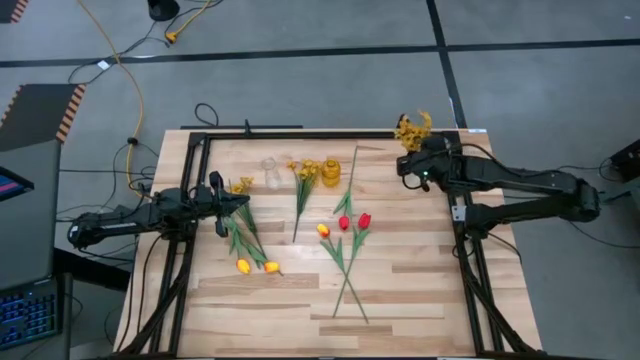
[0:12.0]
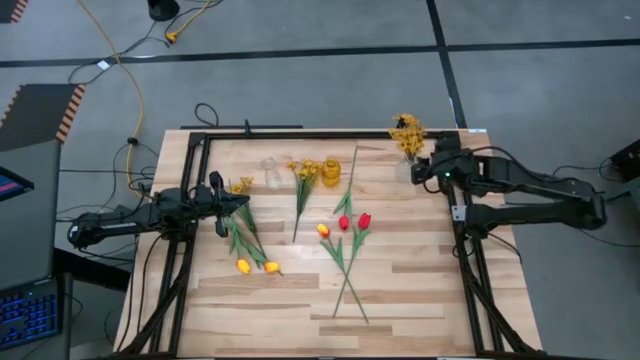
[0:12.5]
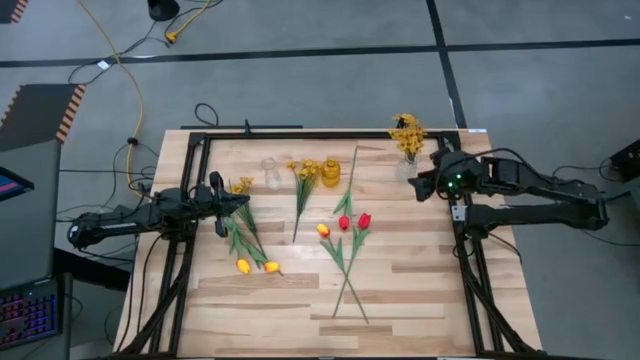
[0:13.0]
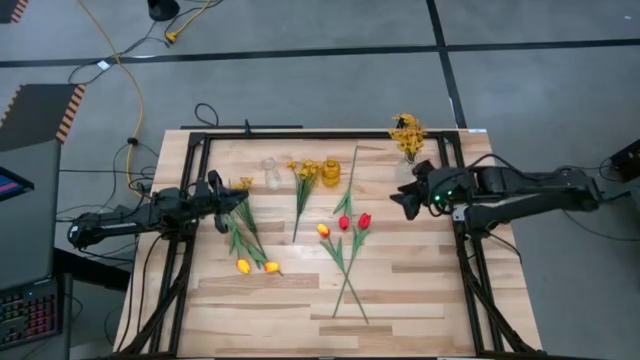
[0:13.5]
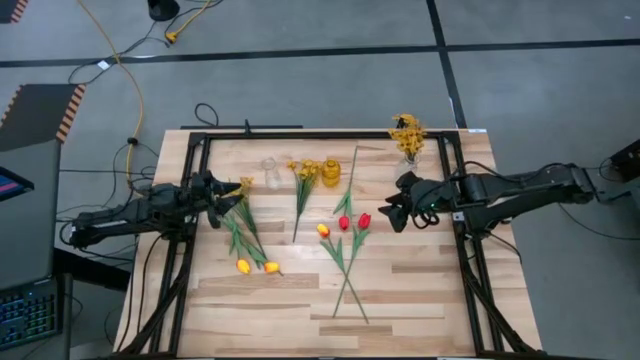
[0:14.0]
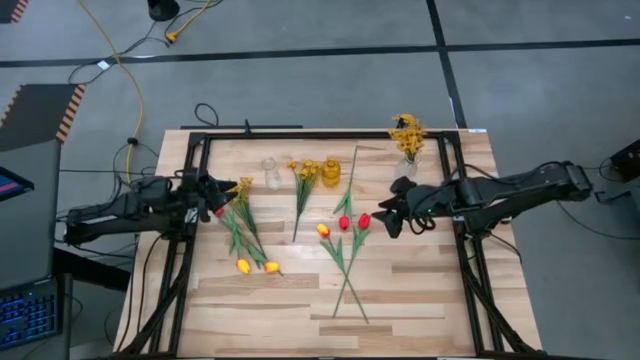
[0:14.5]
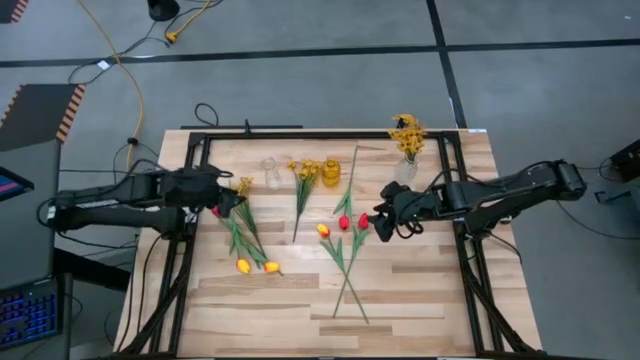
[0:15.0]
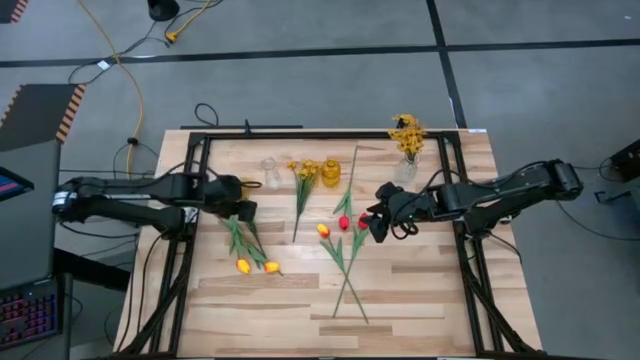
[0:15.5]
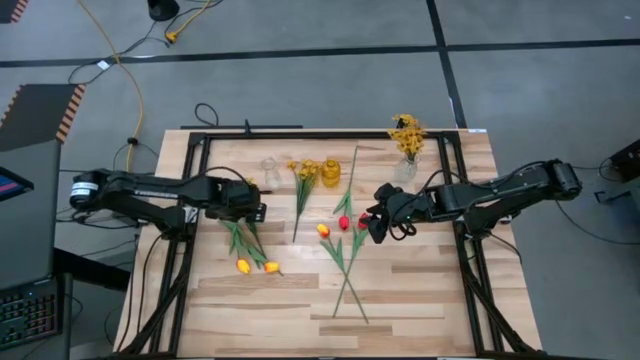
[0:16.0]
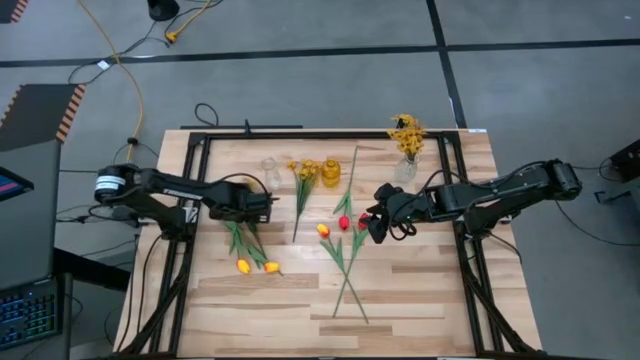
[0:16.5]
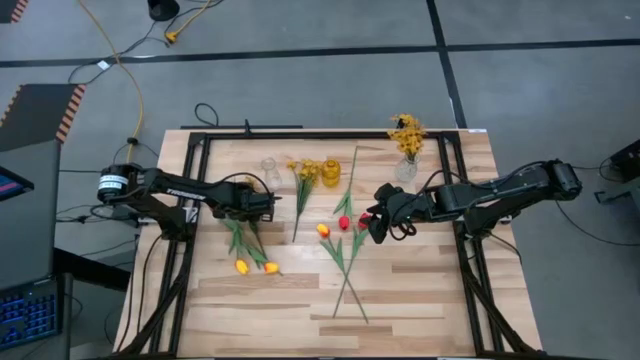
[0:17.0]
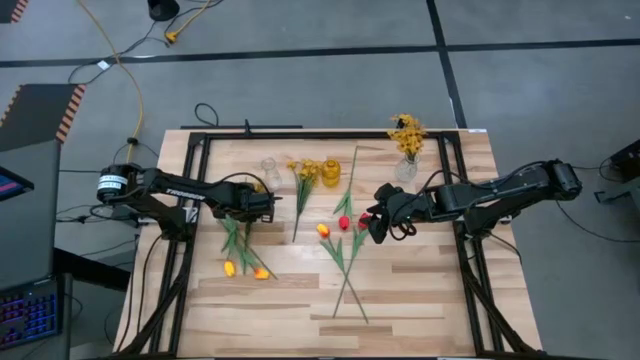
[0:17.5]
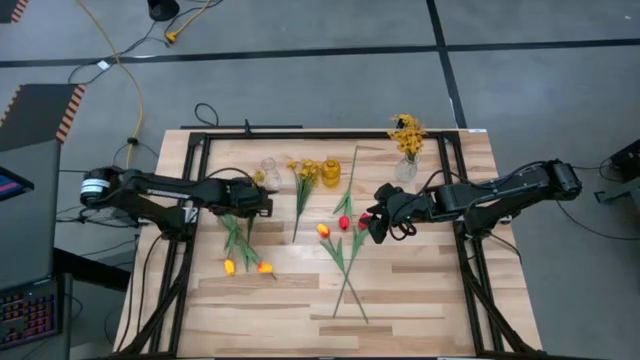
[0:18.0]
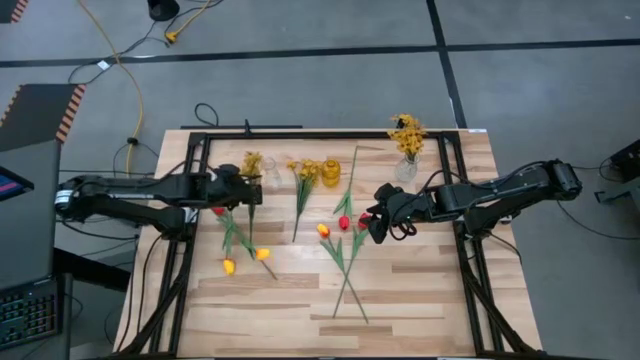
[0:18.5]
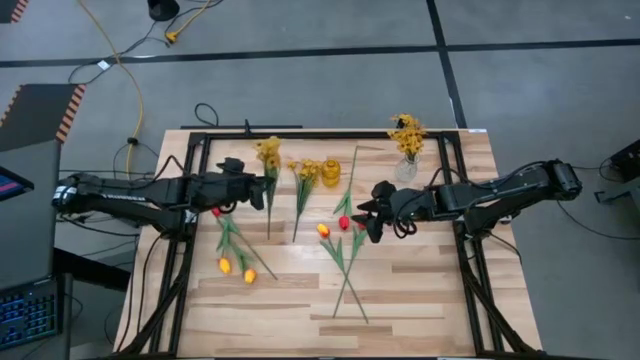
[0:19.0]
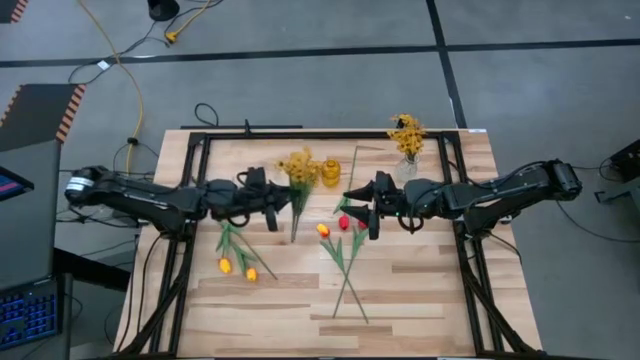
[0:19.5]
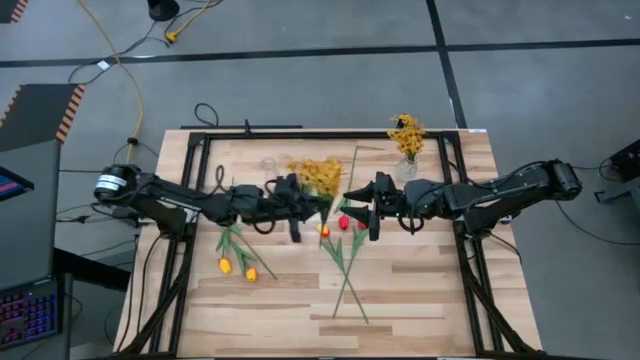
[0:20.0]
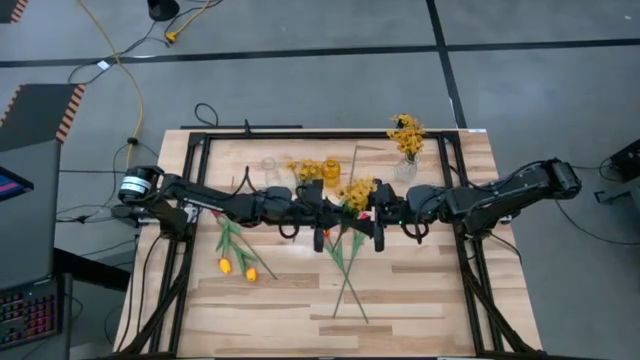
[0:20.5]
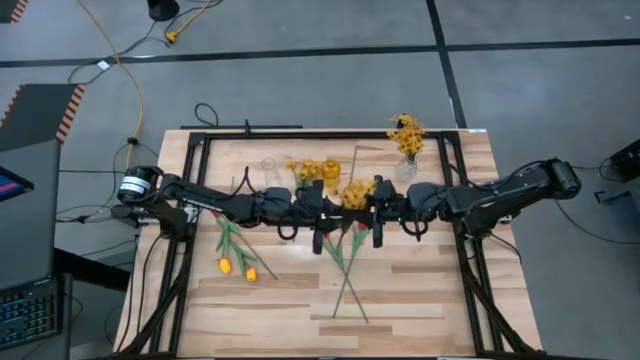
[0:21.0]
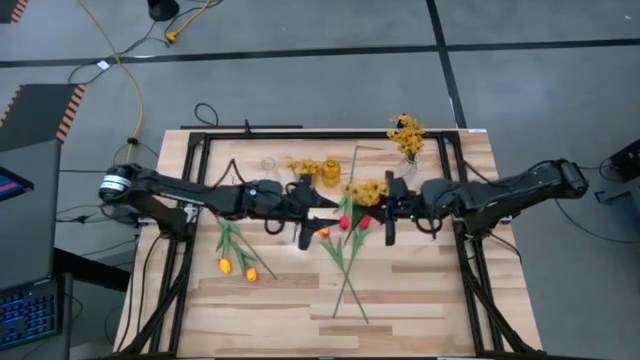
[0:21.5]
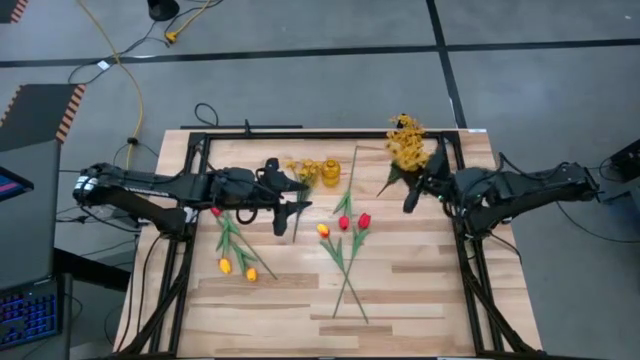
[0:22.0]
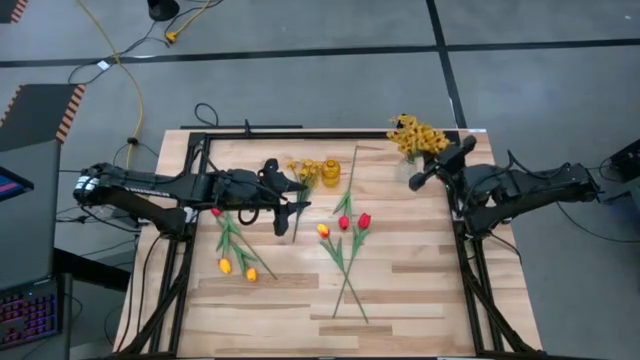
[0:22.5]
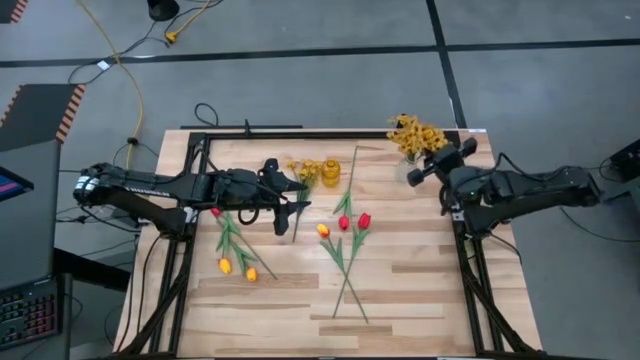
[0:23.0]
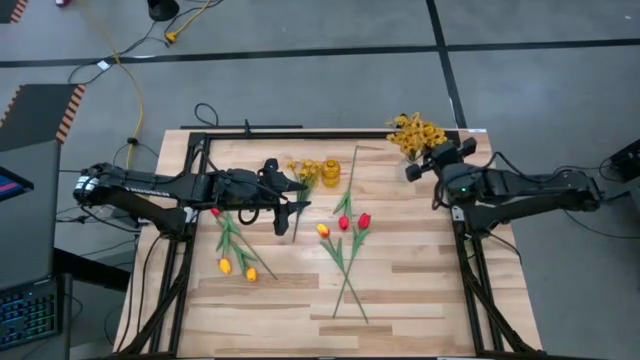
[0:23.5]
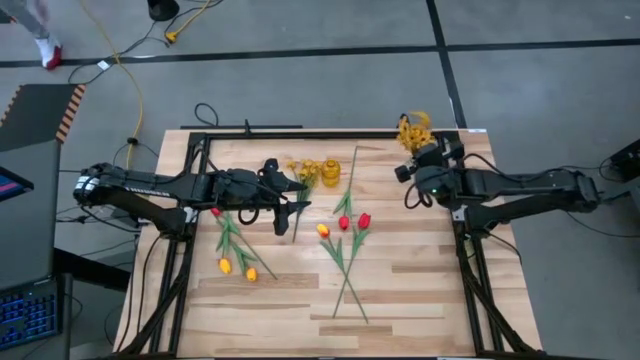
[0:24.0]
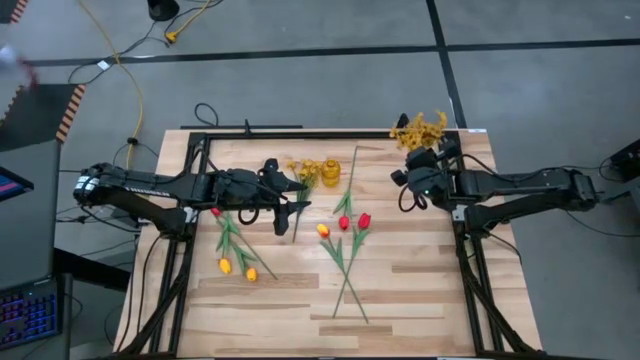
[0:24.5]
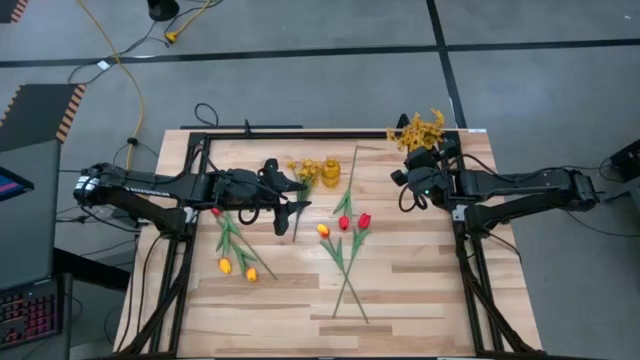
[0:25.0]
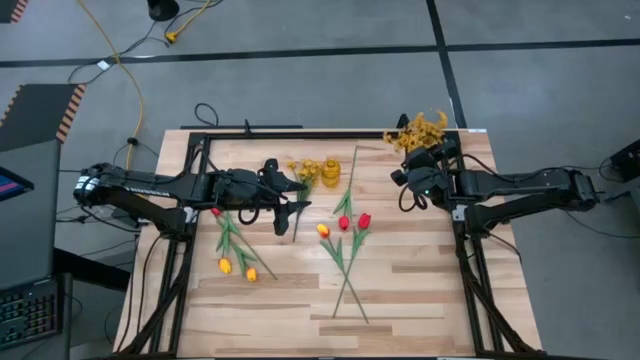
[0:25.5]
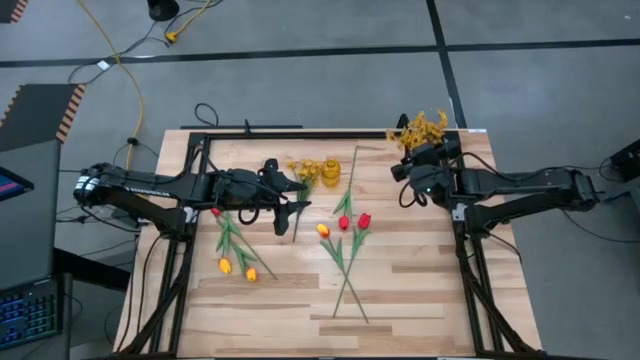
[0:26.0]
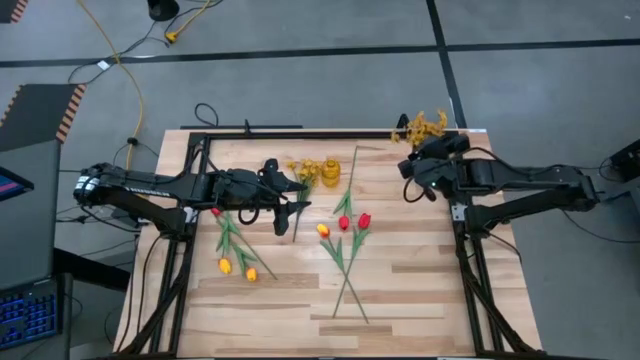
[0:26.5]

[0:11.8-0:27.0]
Task: Sort flowers into vase by color
Put the left yellow flowers into the right transparent flower vase

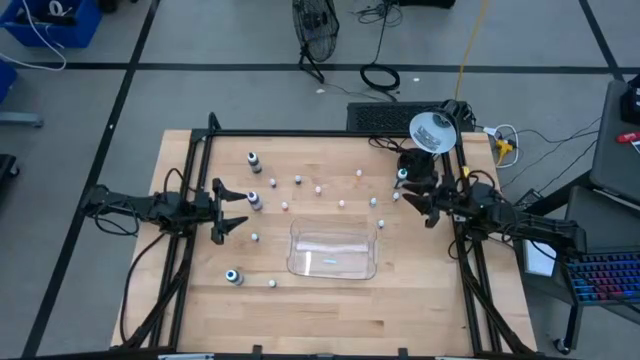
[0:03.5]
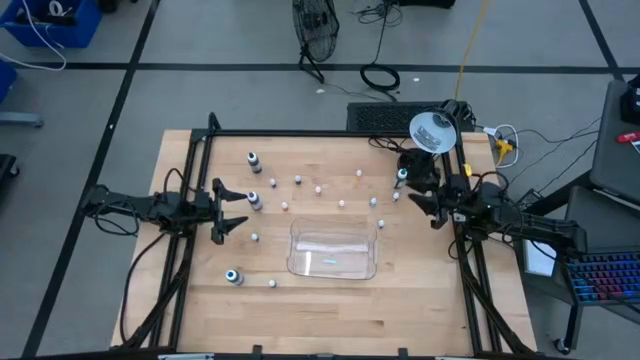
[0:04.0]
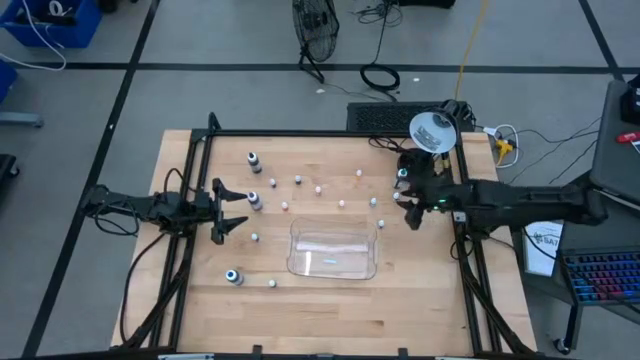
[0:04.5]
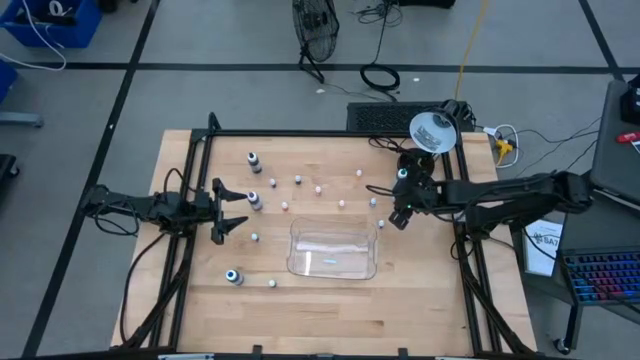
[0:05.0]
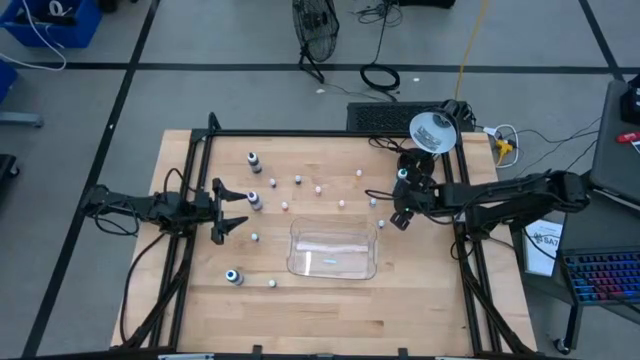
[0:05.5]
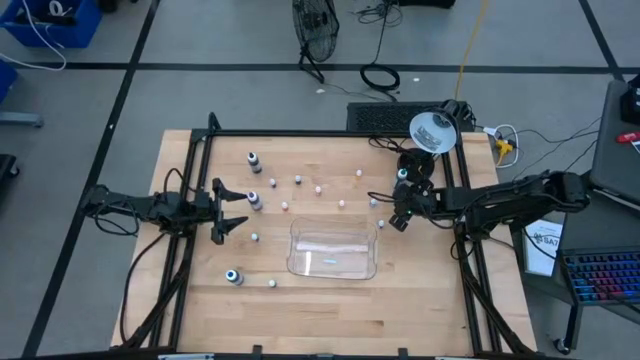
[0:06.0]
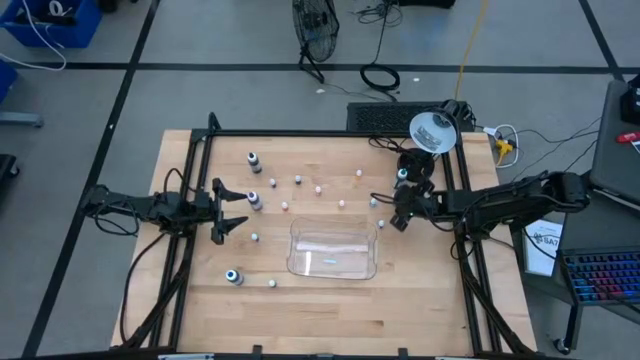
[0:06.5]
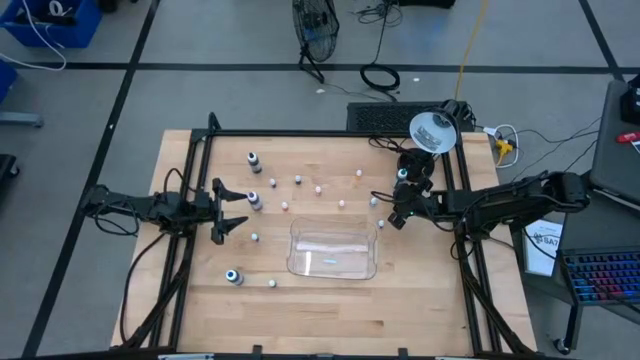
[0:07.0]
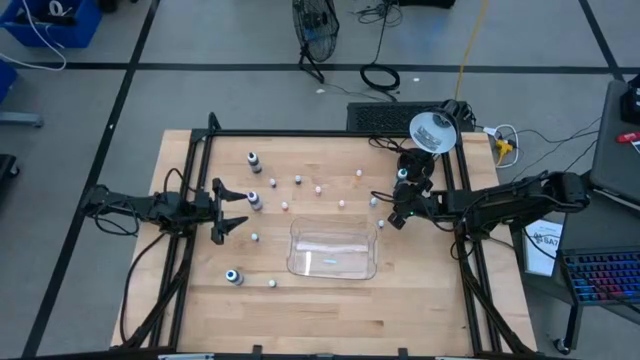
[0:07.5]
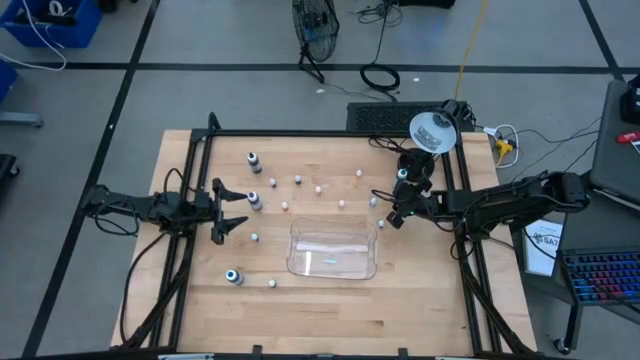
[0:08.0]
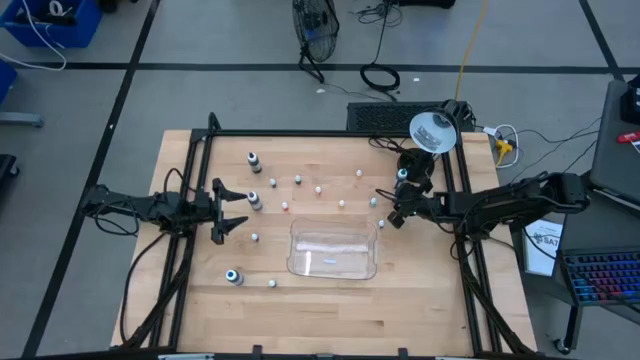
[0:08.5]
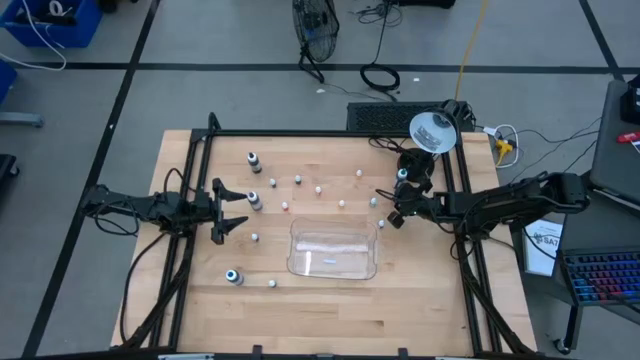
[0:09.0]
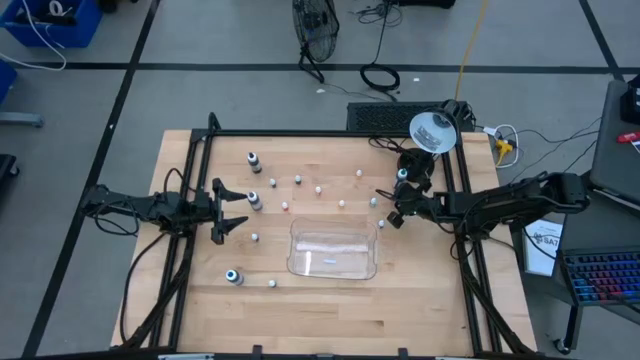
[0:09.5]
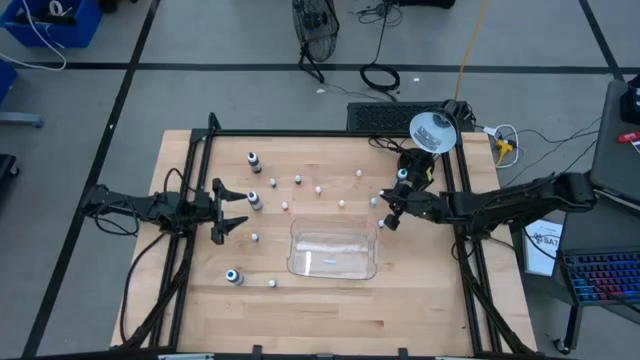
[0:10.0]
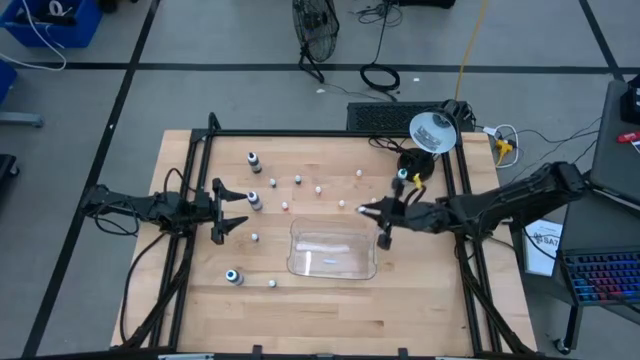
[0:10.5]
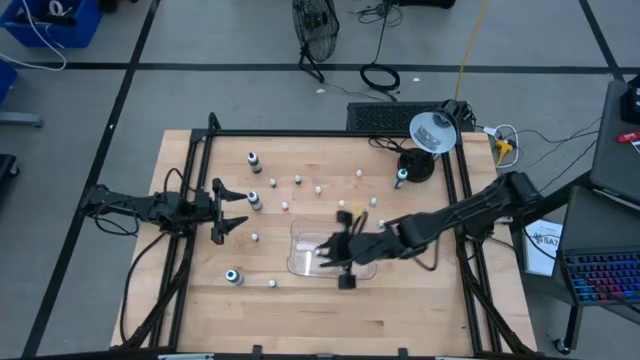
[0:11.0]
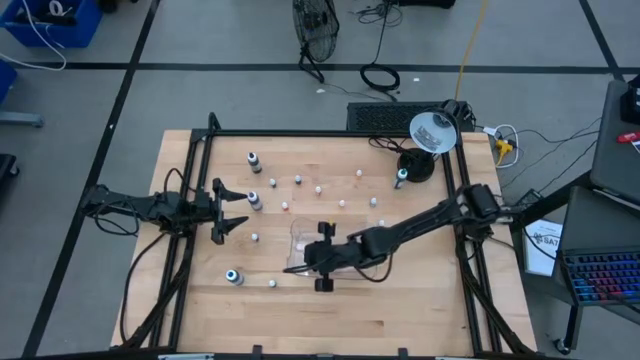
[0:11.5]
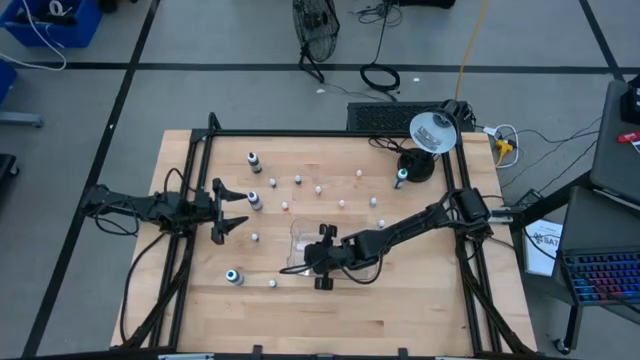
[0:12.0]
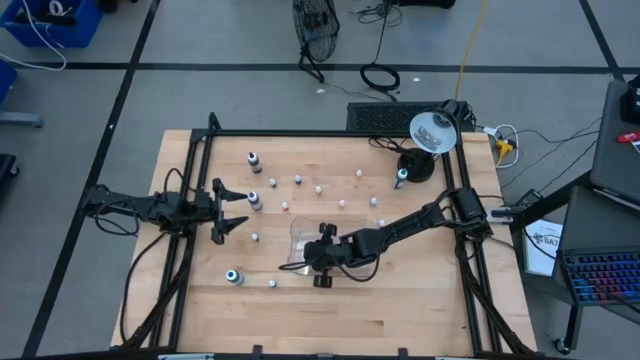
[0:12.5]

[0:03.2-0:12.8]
Task: Pick & Place food coloring
Put the small red food coloring bottle into the bin
